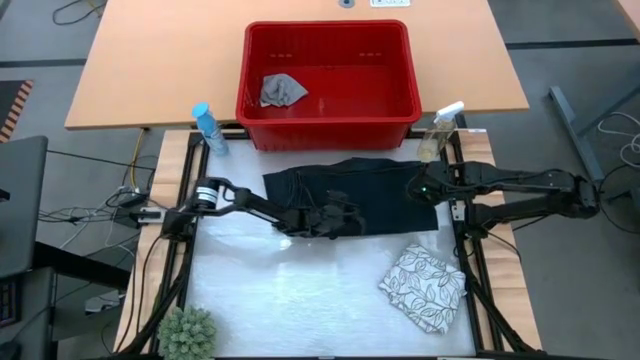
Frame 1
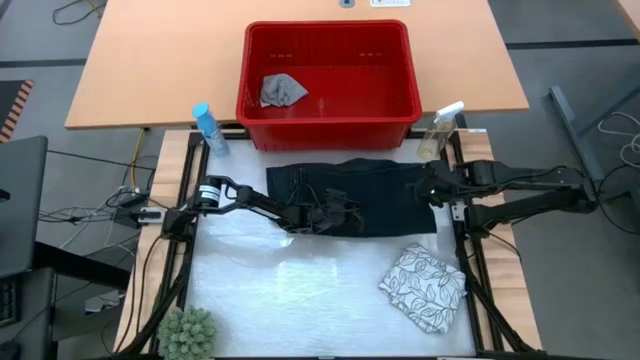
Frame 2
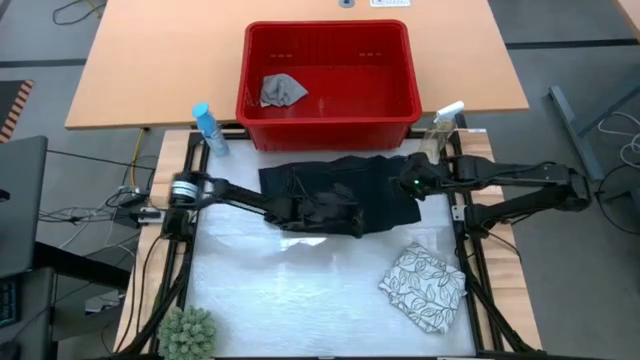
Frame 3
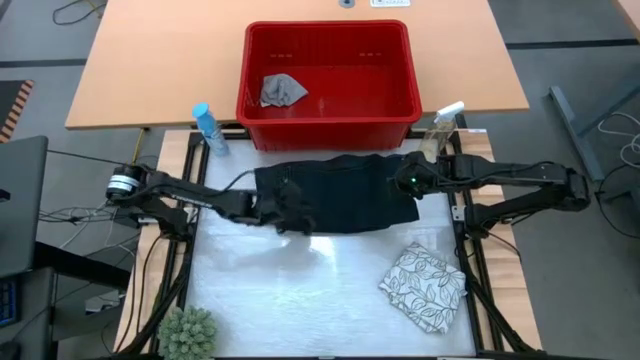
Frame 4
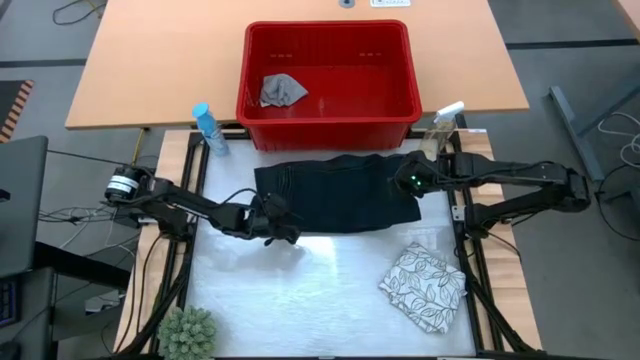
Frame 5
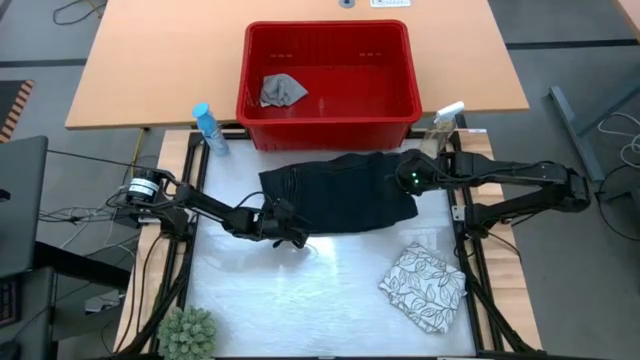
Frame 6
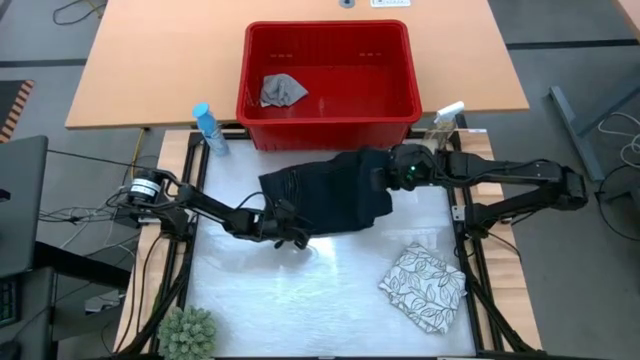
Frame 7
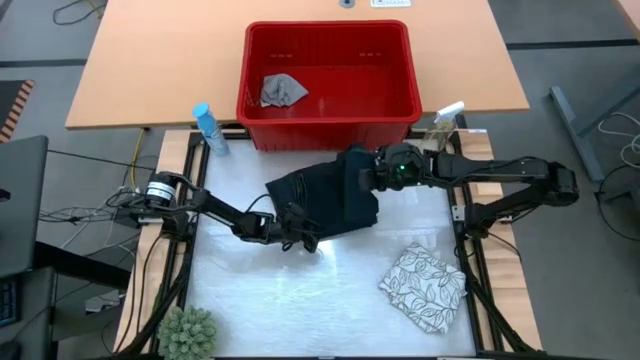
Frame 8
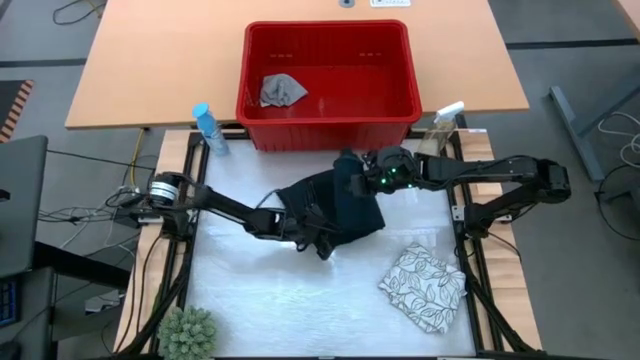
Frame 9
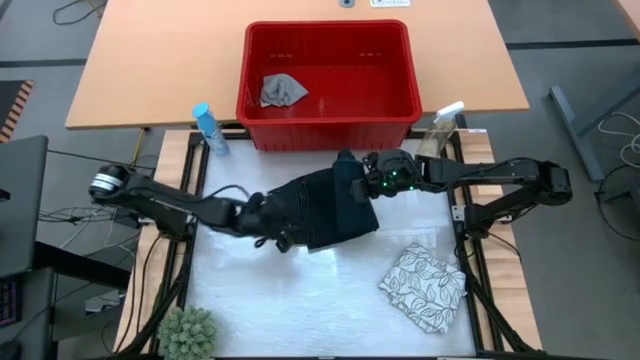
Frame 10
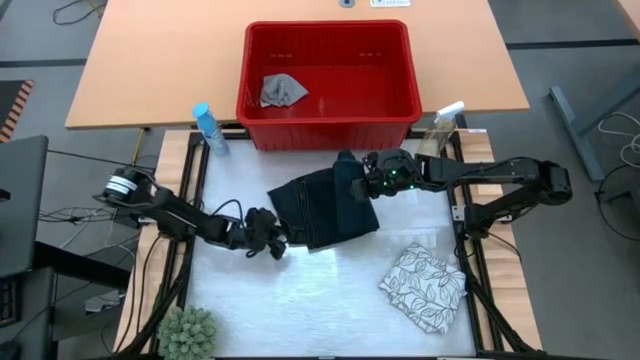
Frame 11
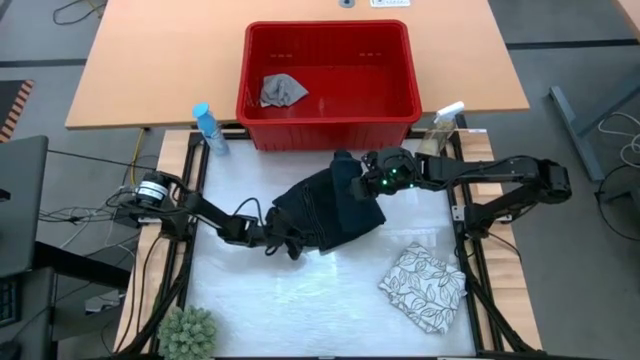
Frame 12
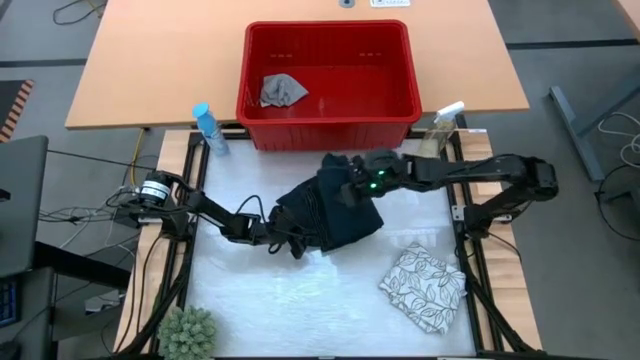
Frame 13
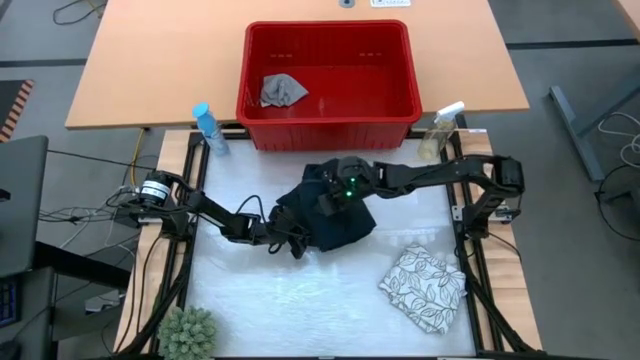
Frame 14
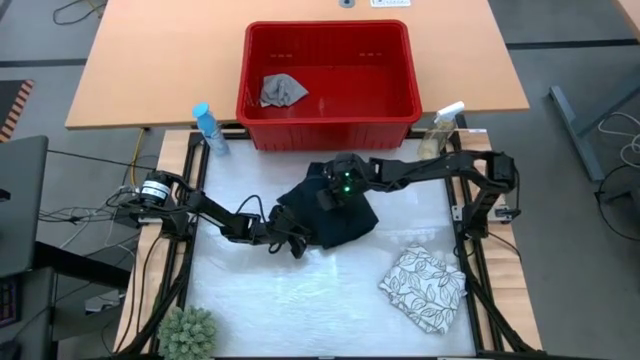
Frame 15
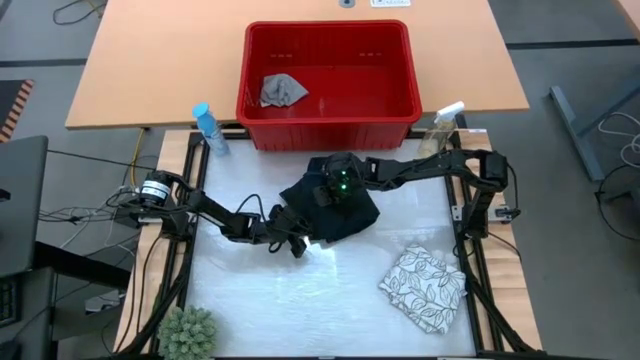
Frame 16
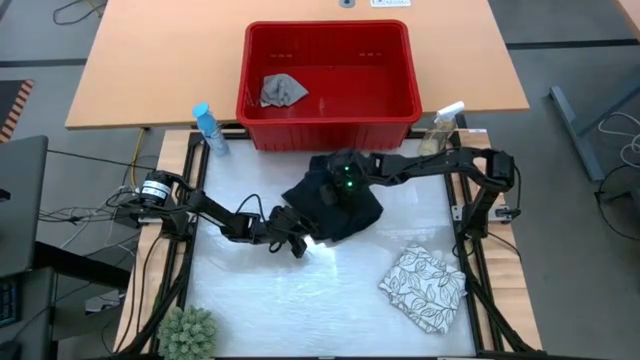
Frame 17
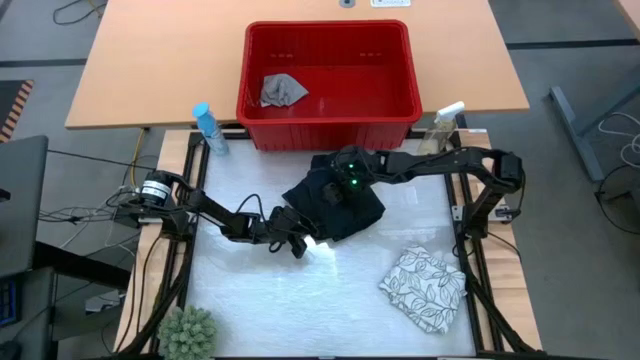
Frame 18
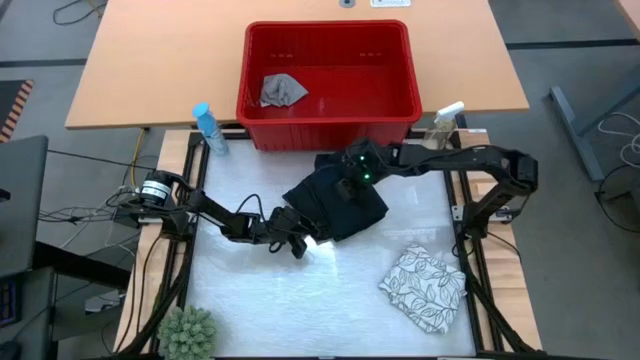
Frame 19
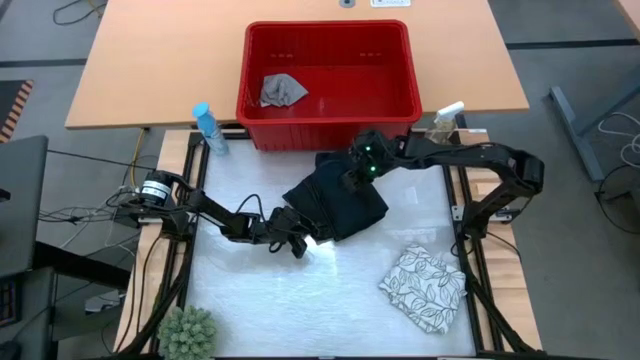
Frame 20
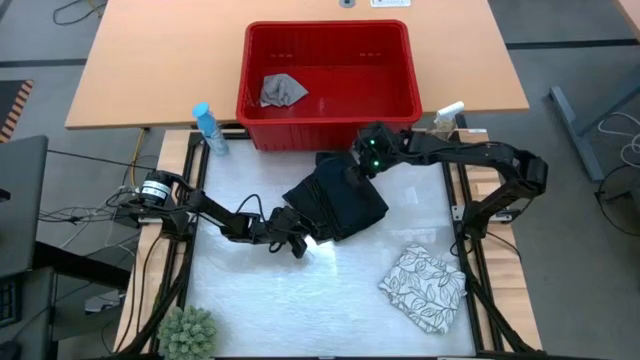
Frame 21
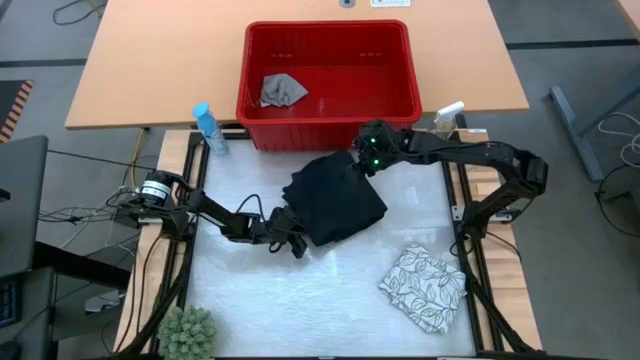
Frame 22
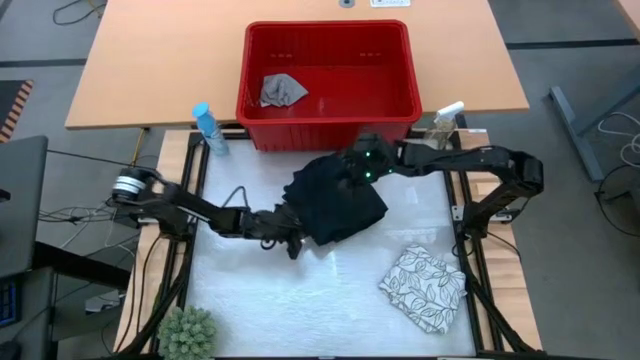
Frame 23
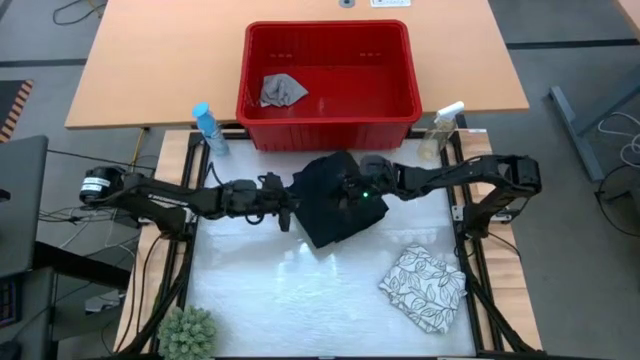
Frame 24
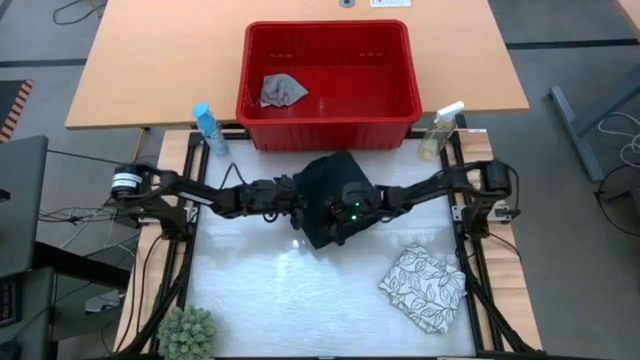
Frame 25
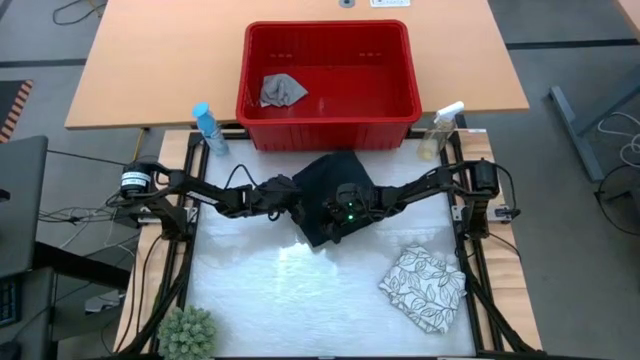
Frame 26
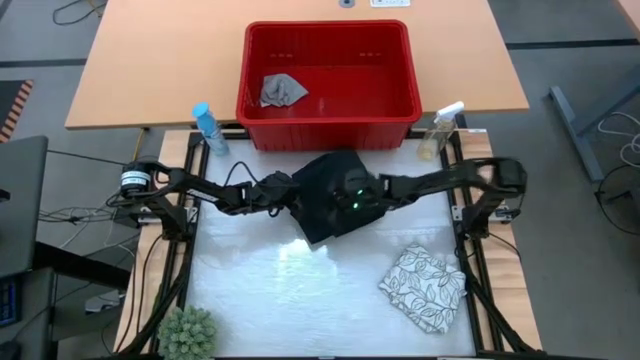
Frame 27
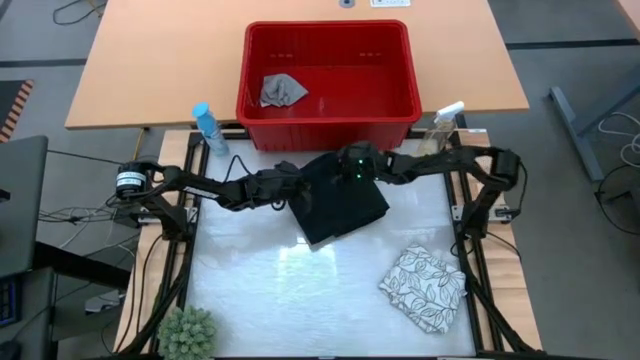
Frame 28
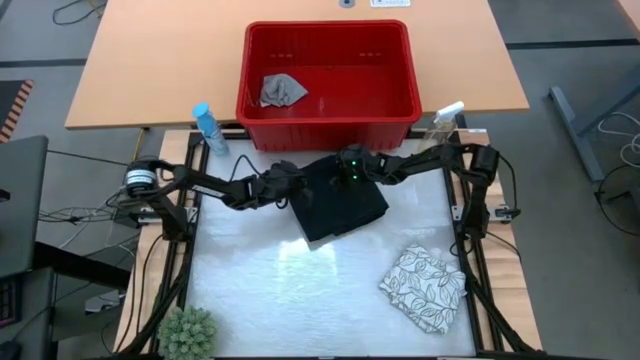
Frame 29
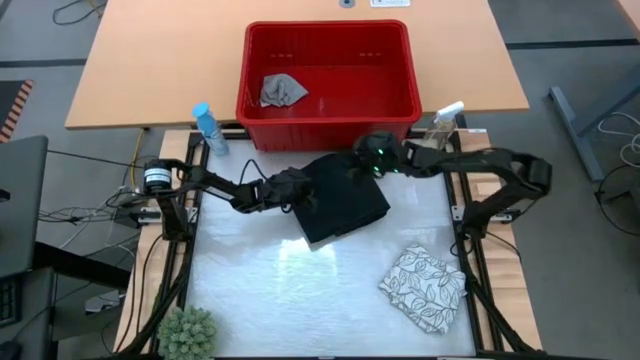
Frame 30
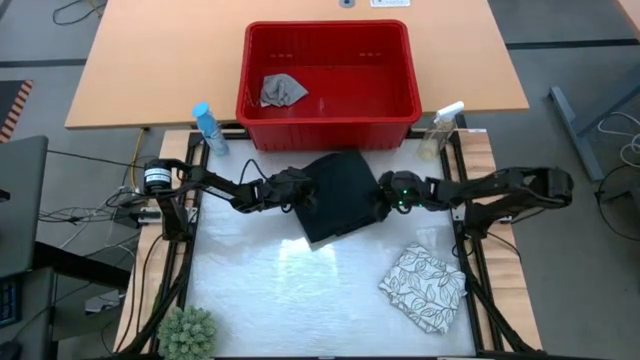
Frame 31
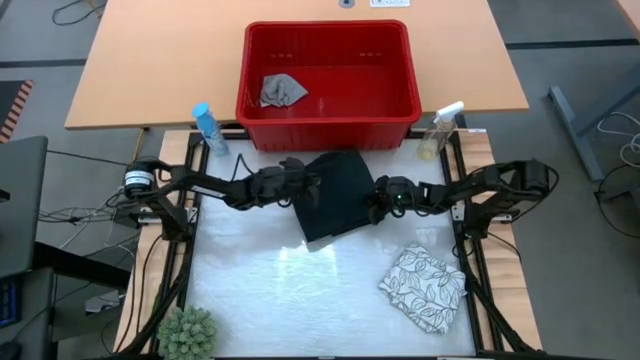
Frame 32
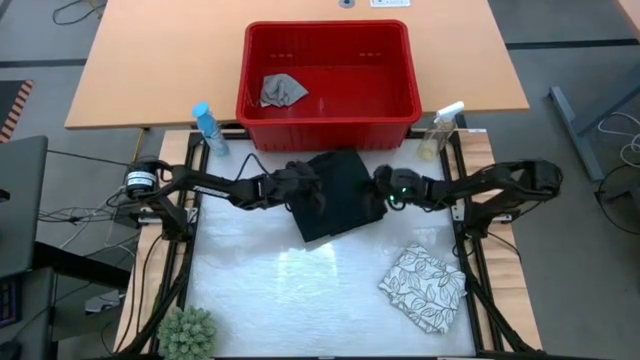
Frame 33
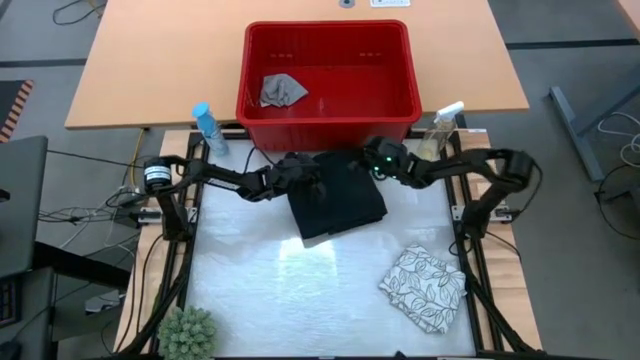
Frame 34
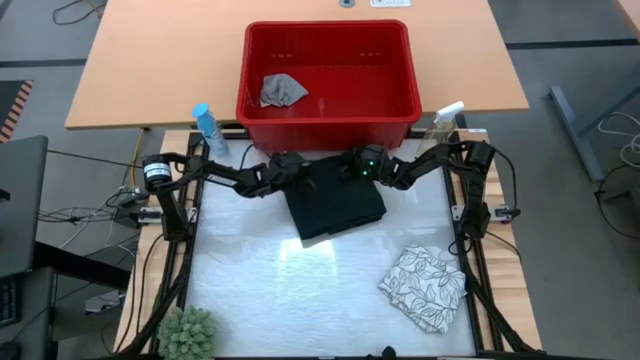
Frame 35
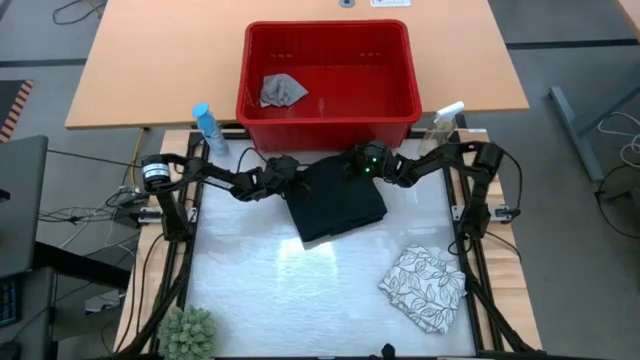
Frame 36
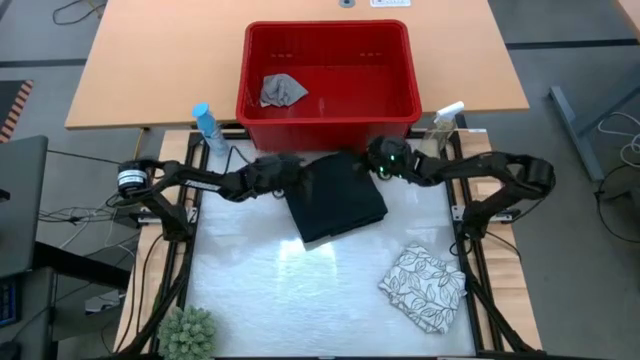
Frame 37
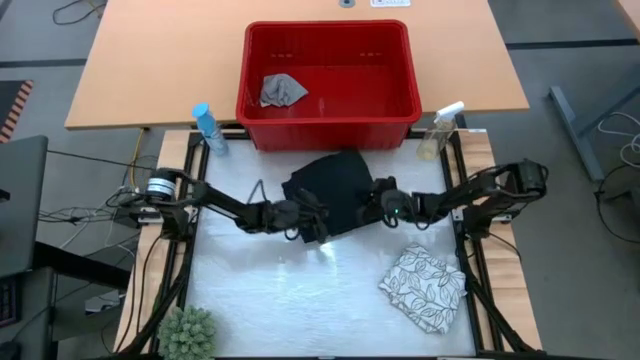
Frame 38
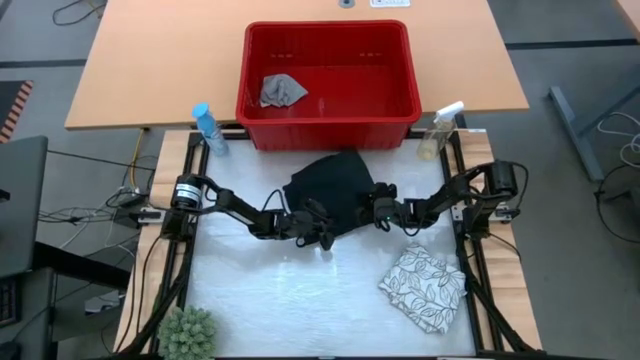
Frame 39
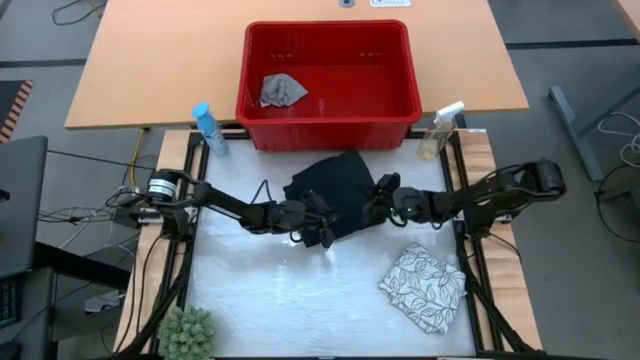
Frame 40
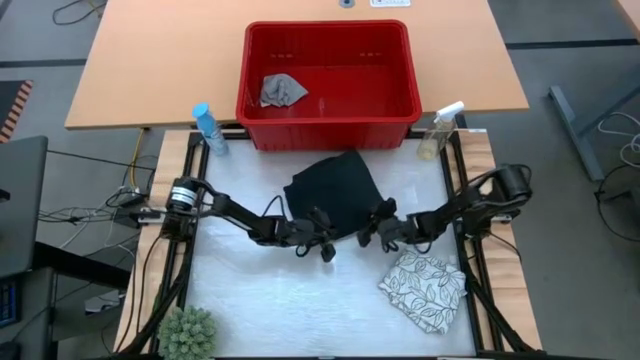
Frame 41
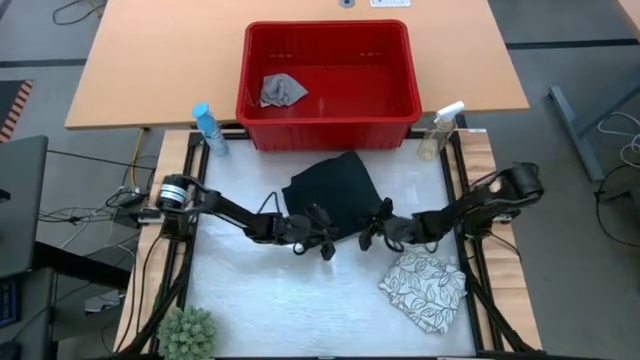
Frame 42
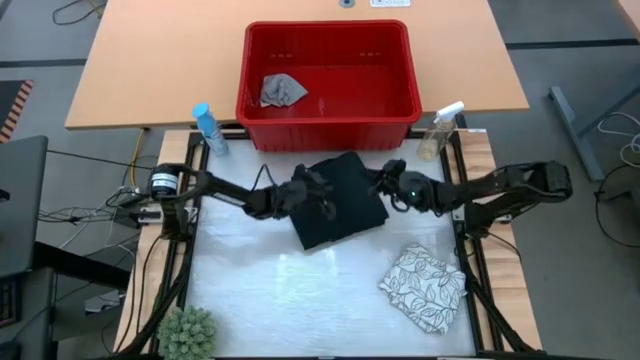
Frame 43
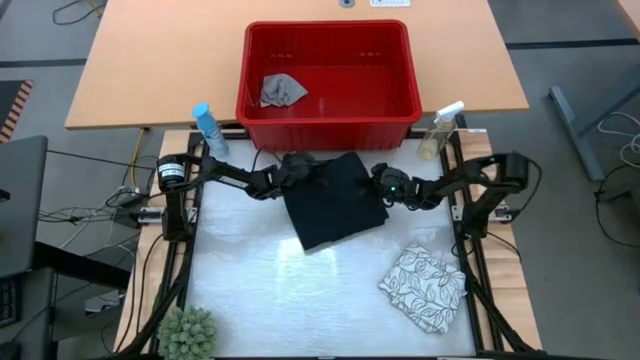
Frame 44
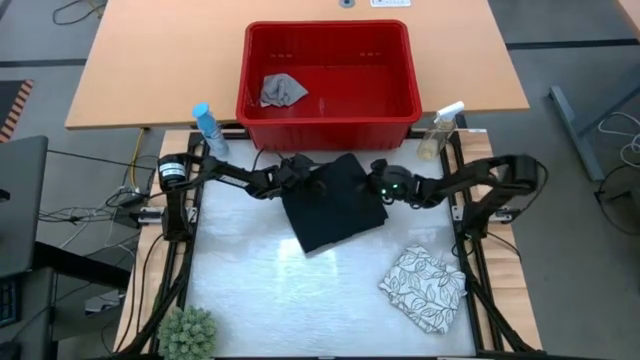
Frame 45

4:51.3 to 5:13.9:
Task: Fold laundry
Fold the dark blue pants
